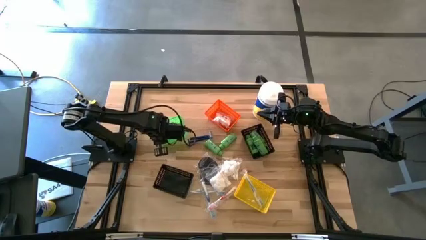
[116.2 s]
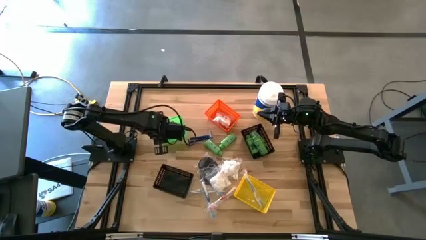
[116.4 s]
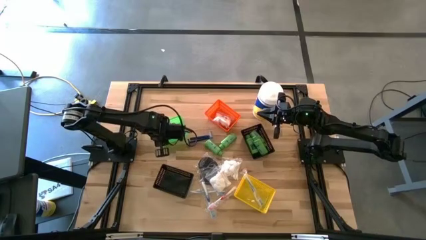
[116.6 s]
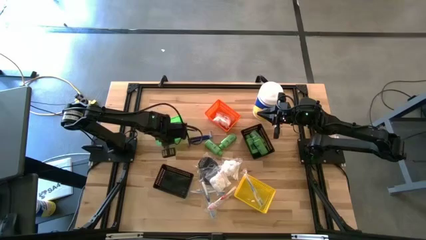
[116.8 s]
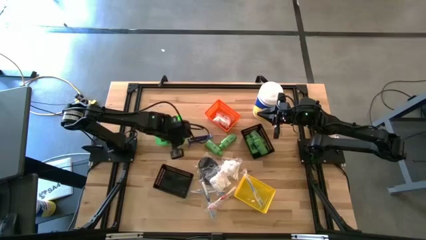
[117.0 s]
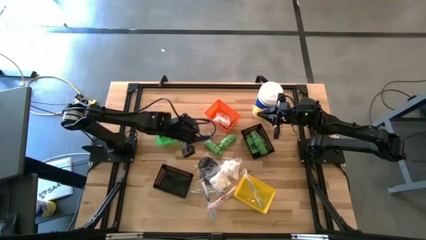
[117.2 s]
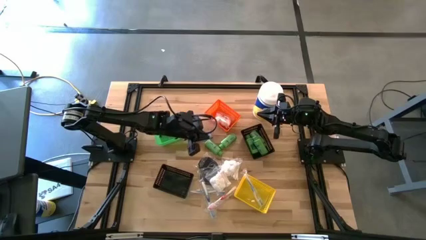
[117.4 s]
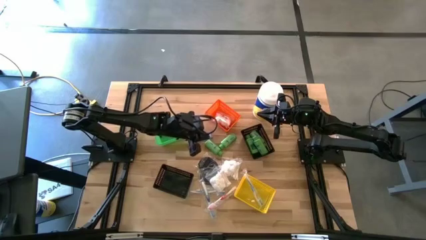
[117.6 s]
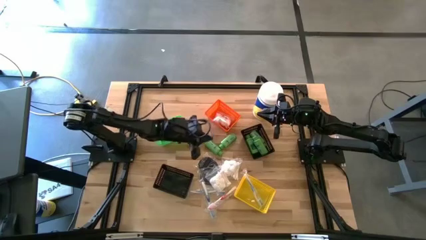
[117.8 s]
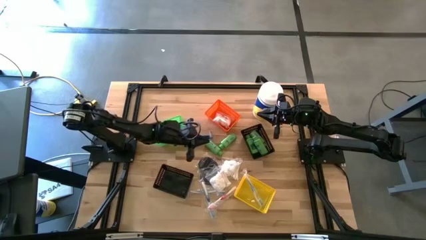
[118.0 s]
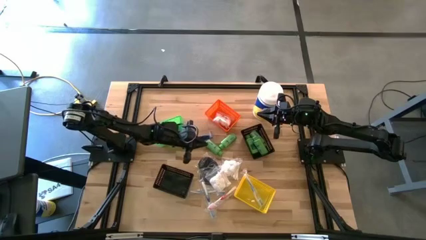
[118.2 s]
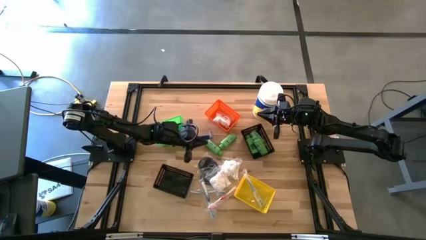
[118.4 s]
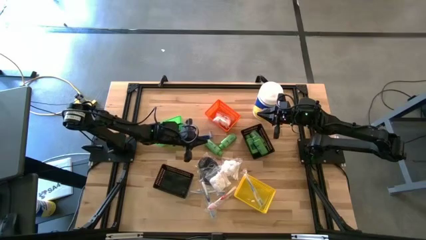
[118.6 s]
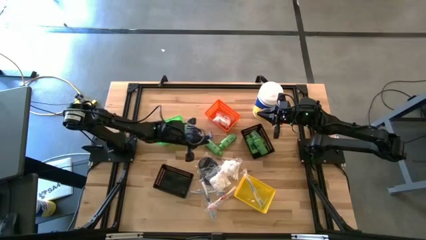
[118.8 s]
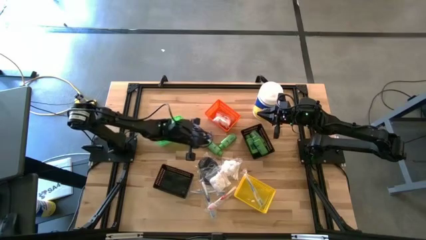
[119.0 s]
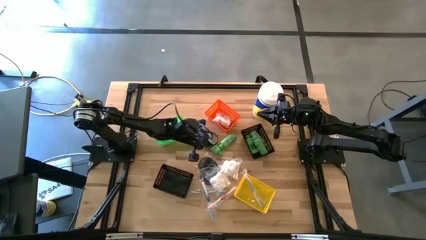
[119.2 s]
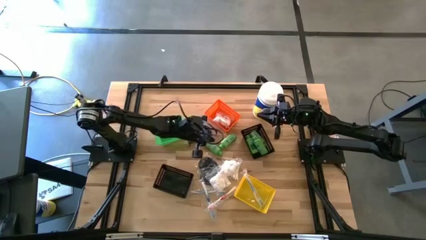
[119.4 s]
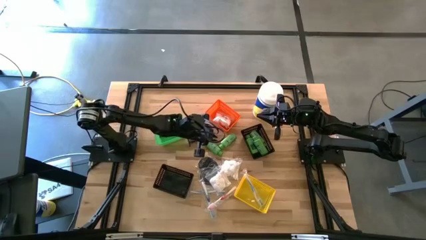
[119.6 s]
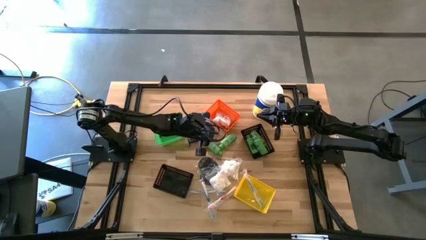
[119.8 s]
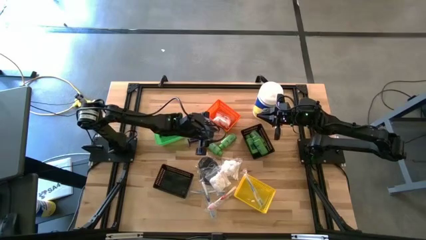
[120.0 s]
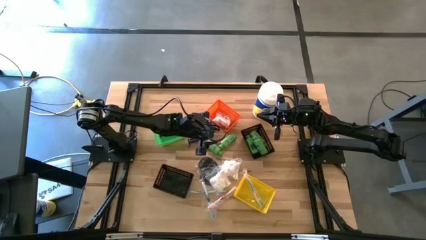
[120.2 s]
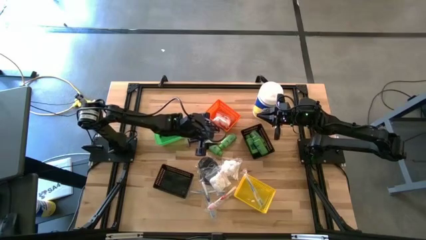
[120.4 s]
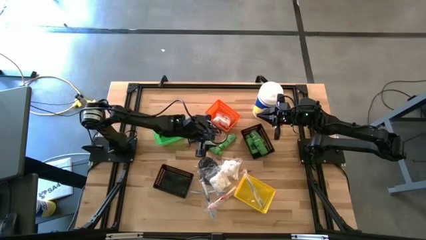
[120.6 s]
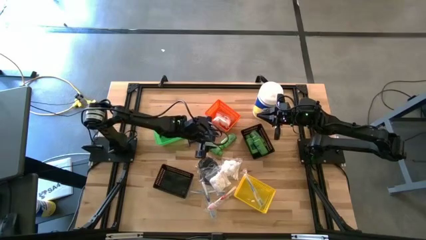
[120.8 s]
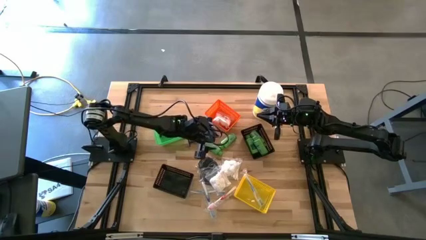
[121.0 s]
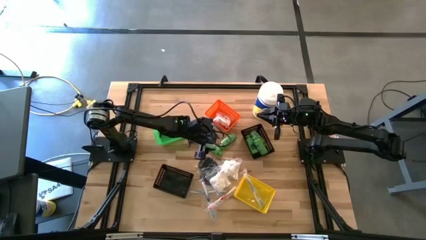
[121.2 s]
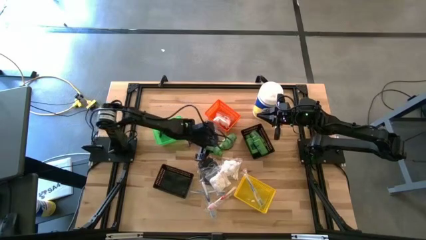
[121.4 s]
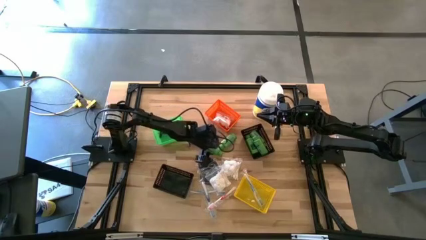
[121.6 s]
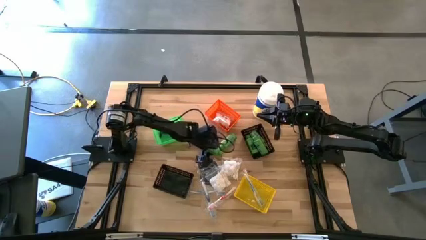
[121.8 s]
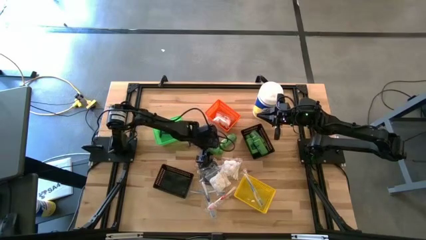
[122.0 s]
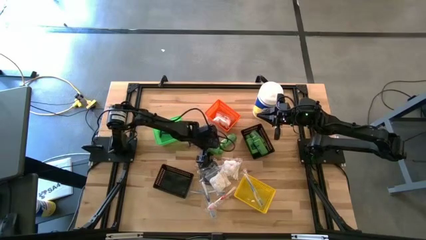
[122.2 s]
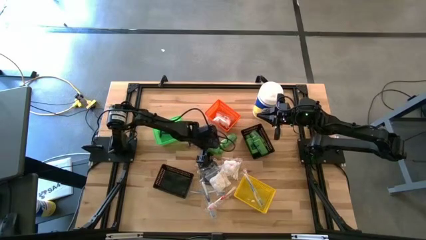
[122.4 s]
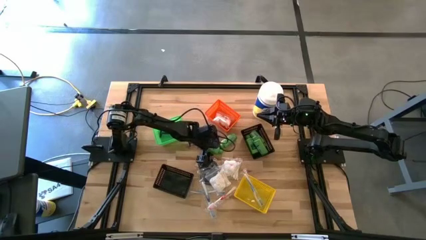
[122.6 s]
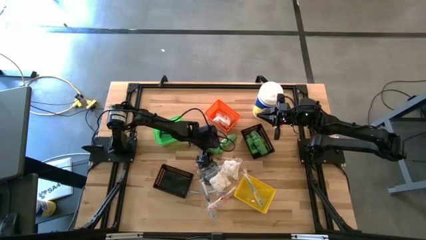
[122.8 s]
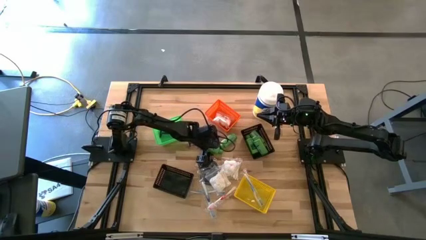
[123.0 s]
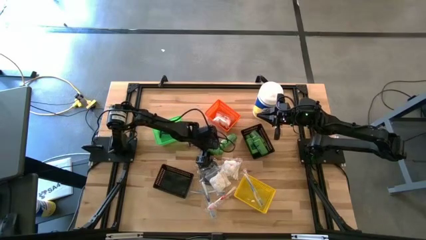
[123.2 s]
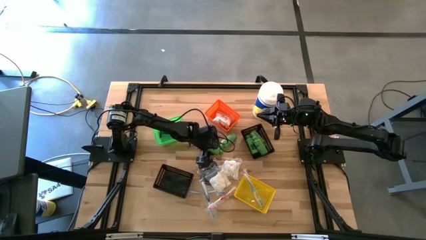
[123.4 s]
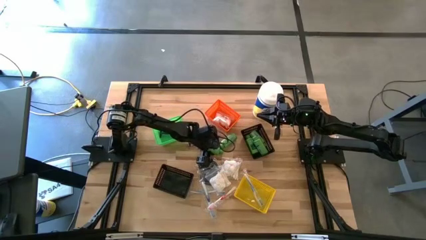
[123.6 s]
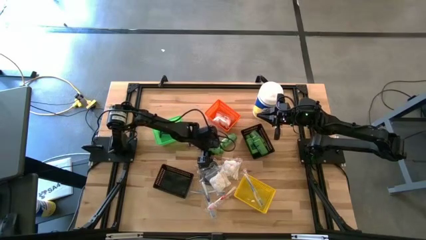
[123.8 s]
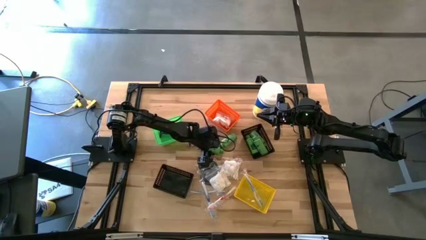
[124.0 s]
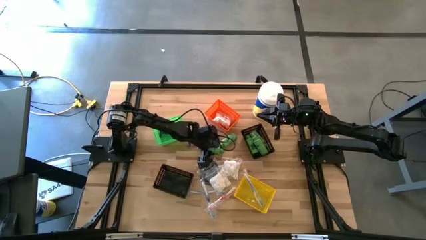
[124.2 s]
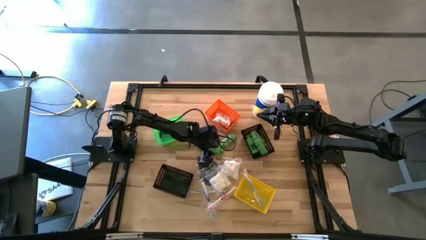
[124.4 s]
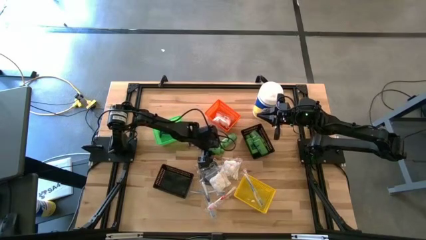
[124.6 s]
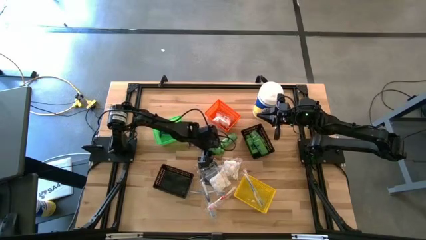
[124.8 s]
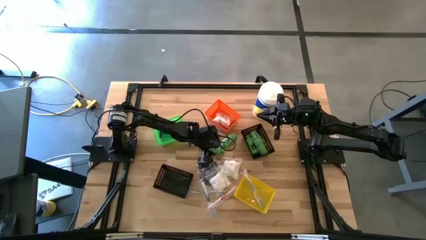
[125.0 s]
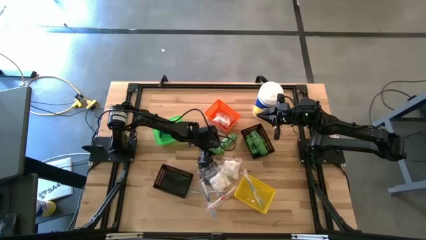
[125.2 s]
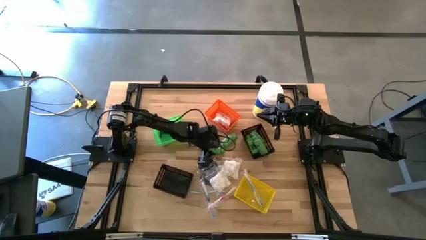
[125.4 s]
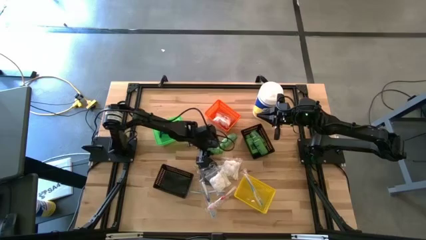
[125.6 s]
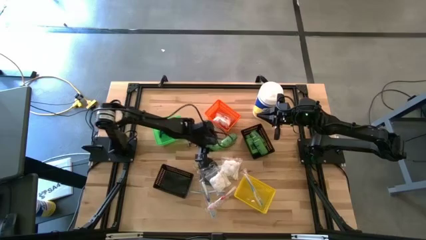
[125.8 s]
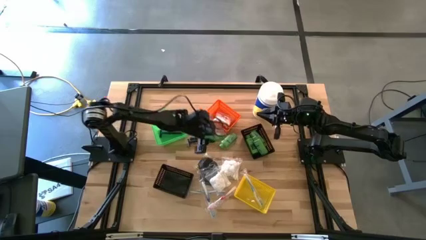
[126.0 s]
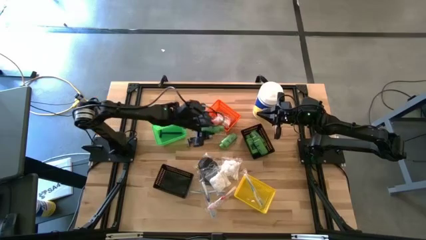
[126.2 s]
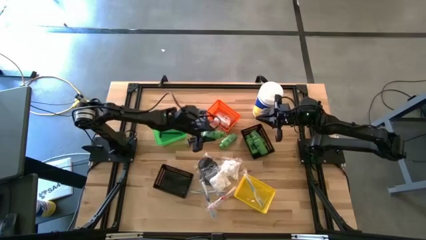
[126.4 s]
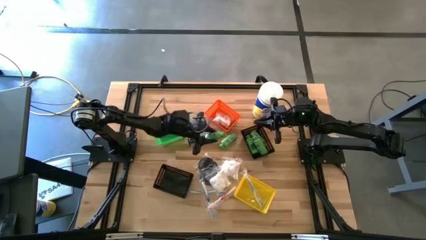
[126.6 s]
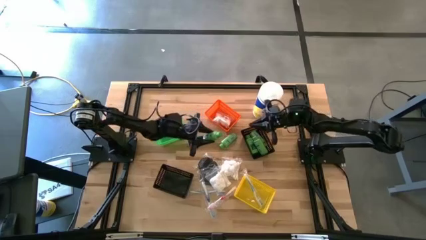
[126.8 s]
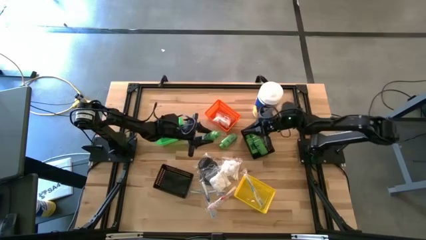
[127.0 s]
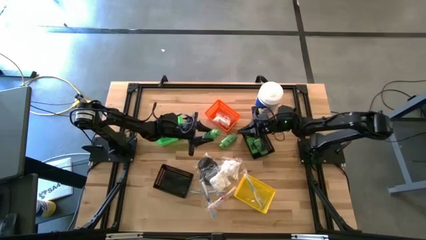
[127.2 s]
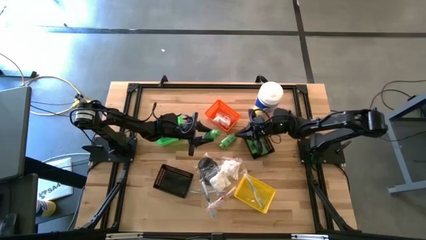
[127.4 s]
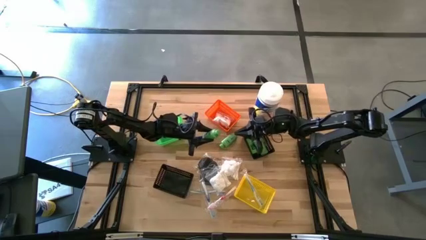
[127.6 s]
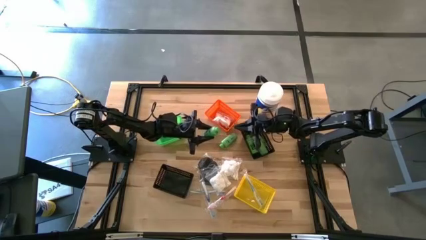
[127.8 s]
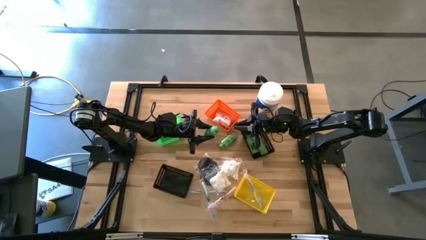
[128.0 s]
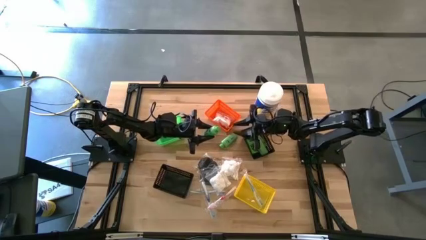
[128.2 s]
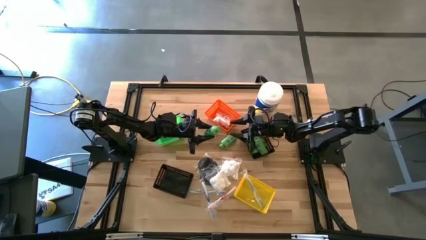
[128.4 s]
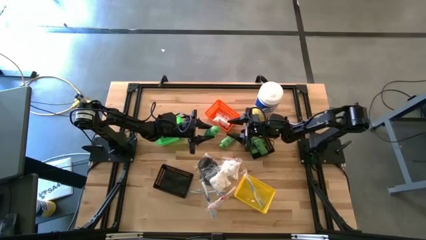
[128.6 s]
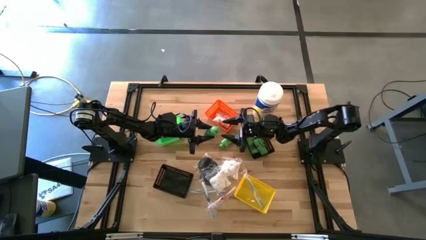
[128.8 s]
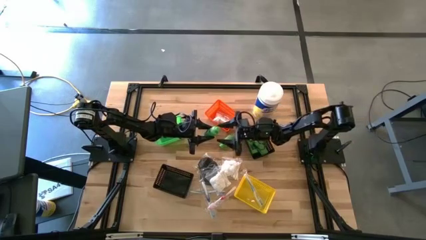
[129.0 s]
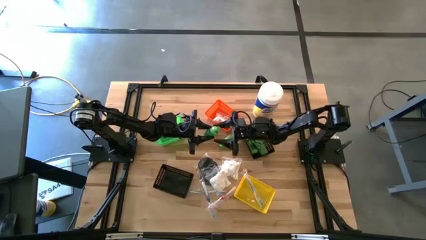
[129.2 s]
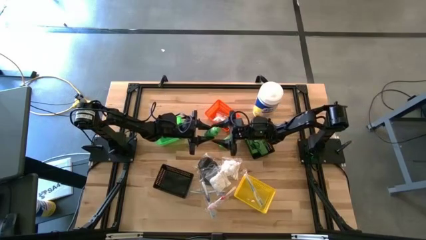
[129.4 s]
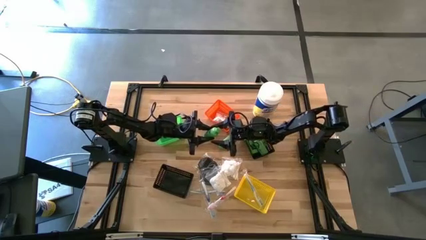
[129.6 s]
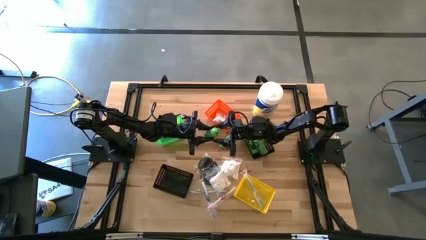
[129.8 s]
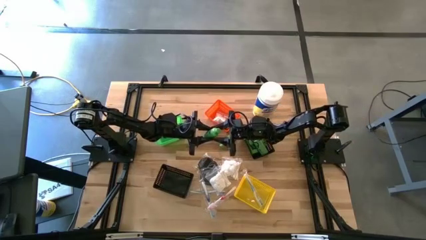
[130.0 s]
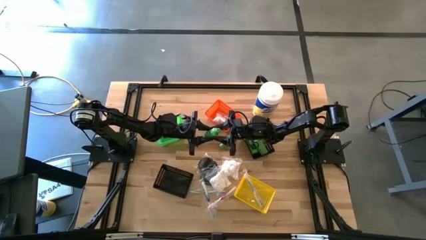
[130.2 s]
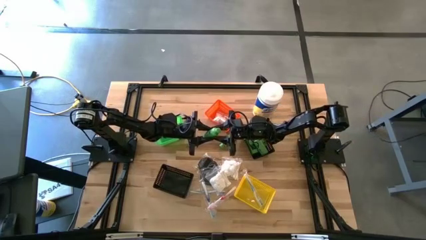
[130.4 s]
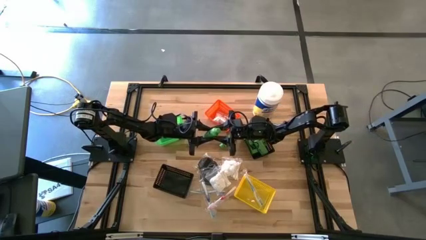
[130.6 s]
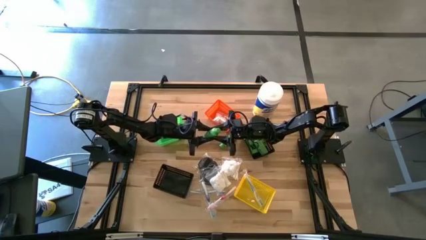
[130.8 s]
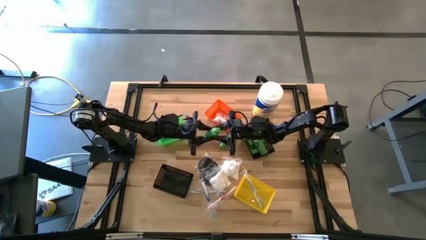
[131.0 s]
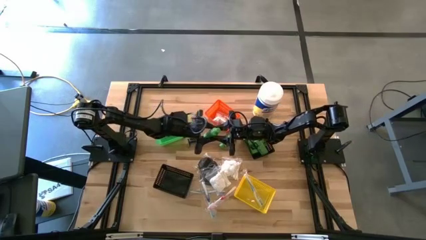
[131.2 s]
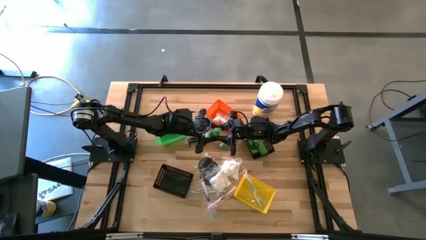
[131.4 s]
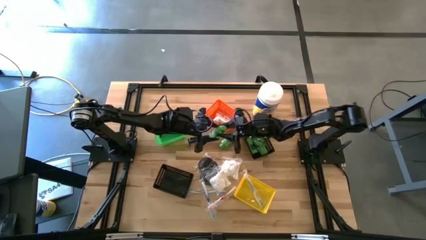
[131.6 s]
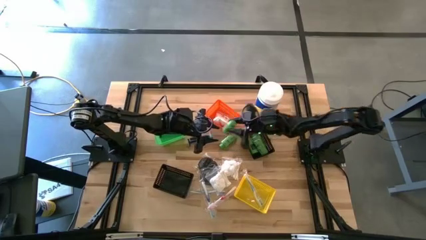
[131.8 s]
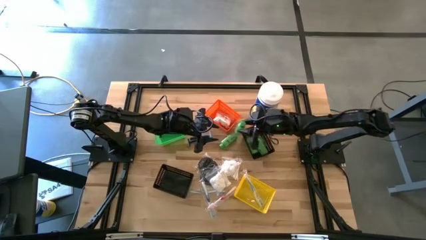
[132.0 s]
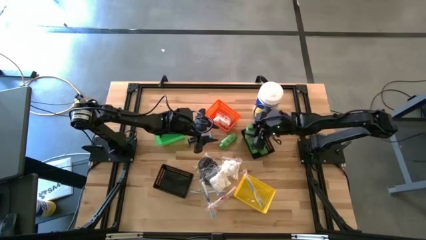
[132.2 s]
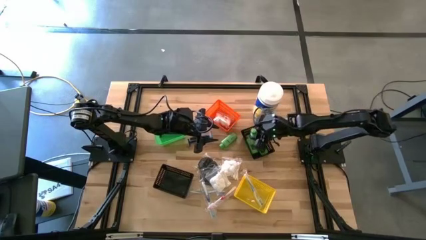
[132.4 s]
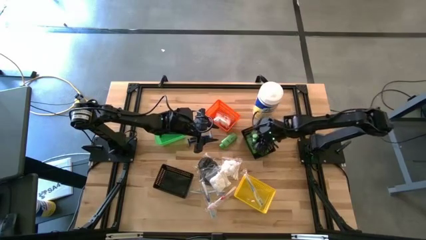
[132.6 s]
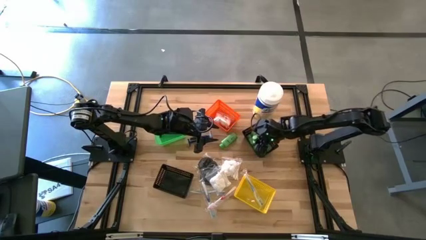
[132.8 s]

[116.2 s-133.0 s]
Task: Pick & Place Travel size toiletries
Put the green shampoo into the top black bin
